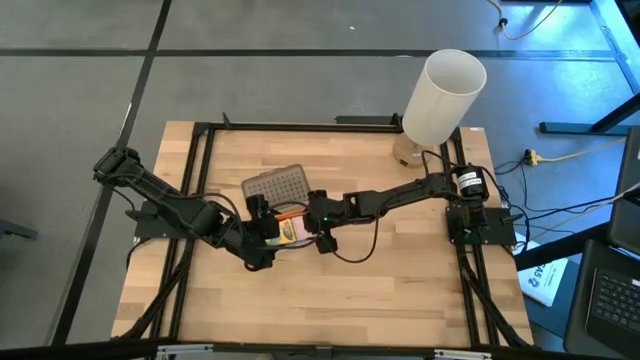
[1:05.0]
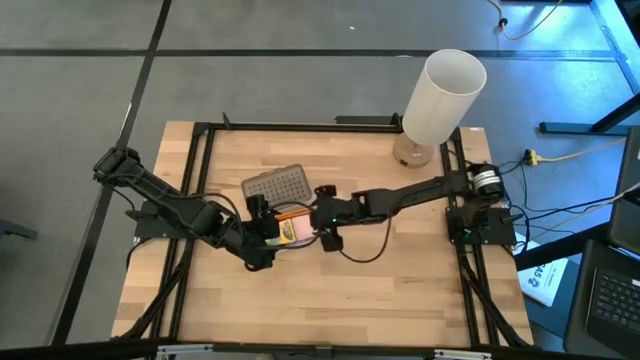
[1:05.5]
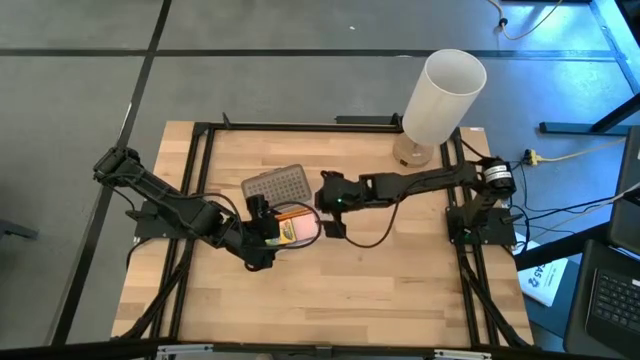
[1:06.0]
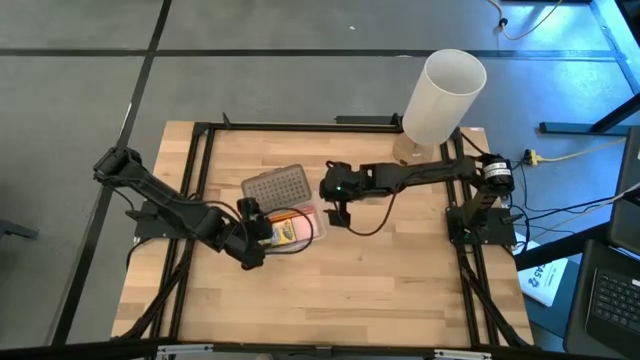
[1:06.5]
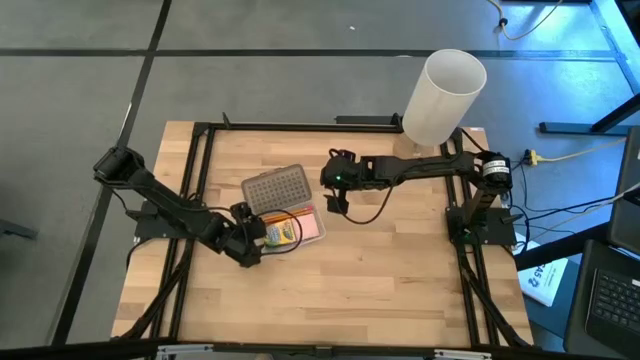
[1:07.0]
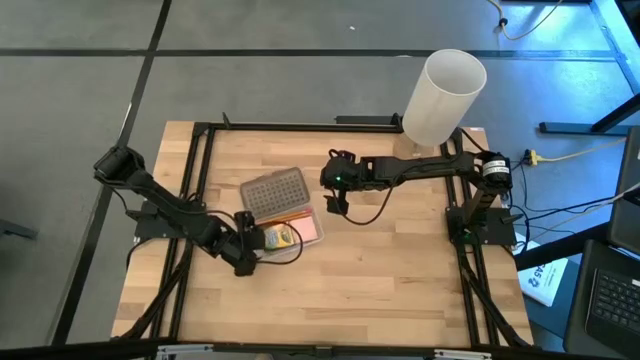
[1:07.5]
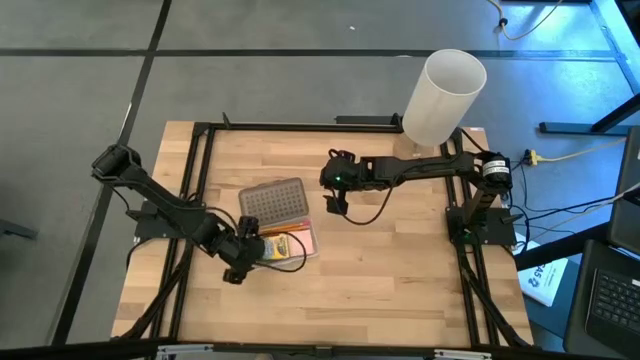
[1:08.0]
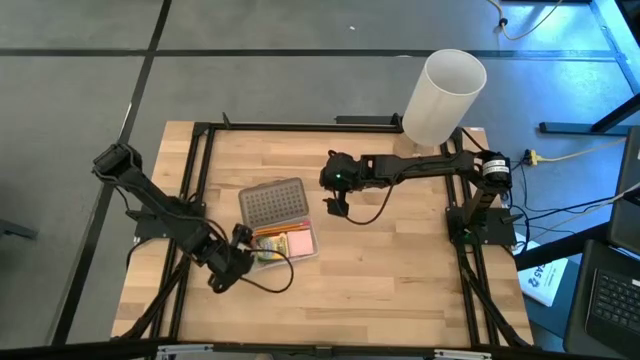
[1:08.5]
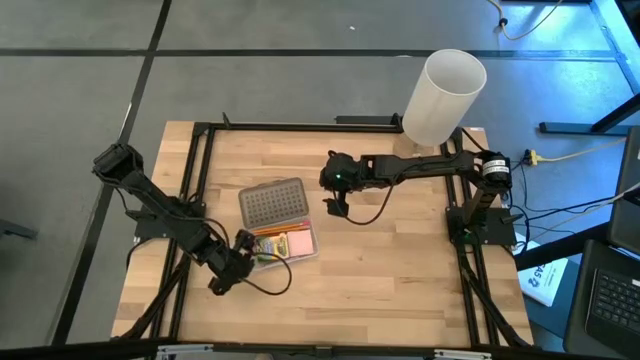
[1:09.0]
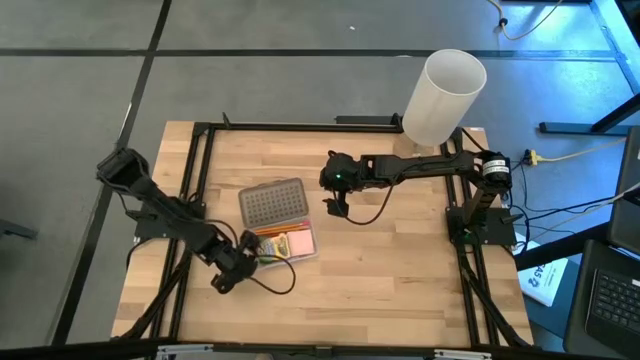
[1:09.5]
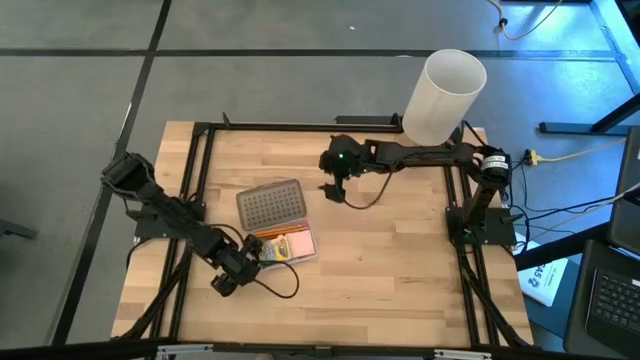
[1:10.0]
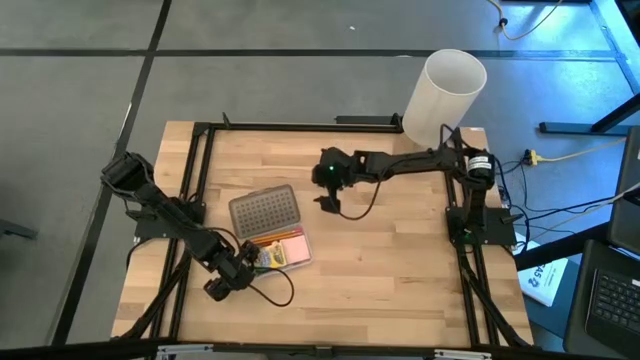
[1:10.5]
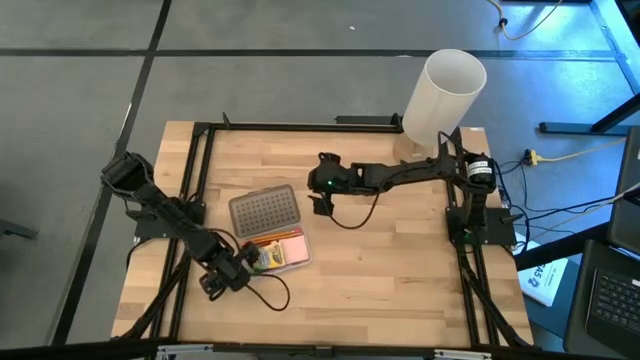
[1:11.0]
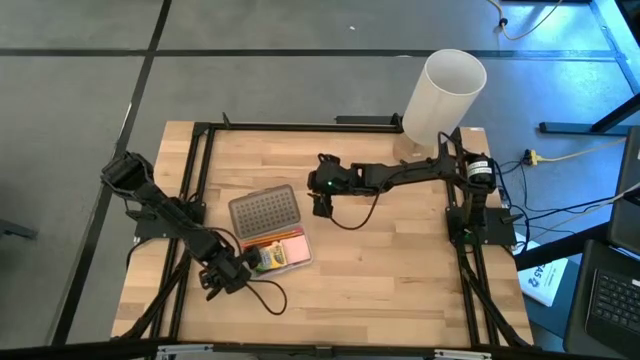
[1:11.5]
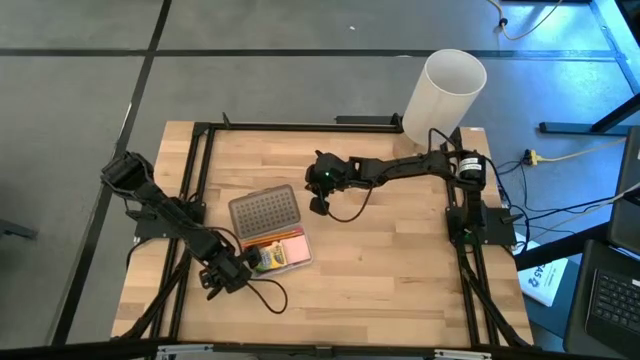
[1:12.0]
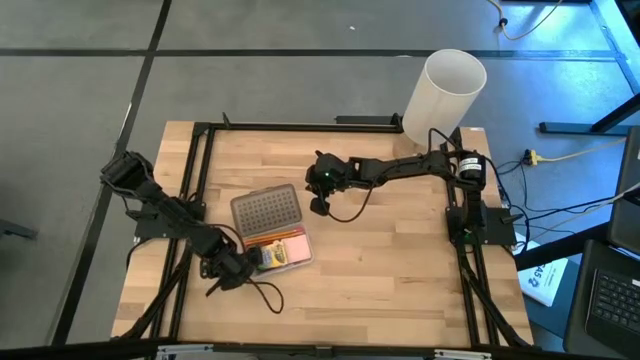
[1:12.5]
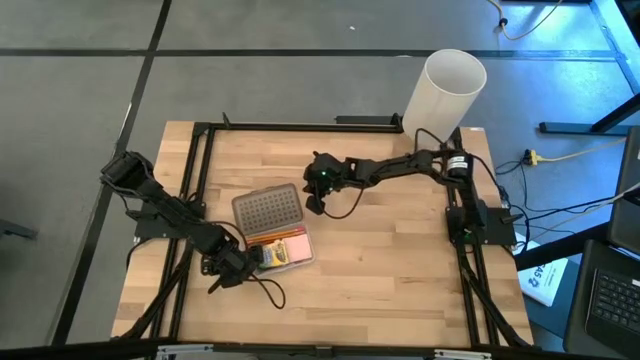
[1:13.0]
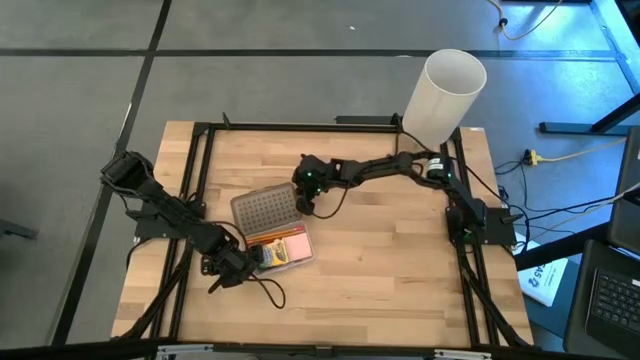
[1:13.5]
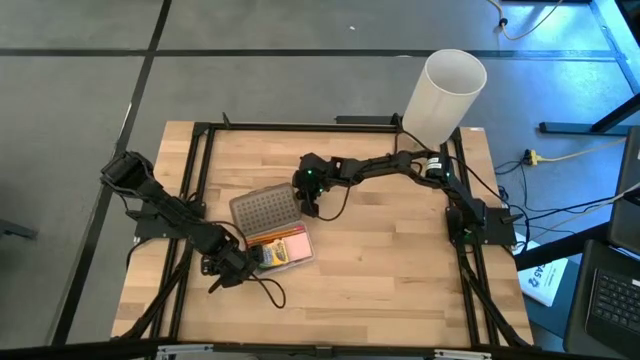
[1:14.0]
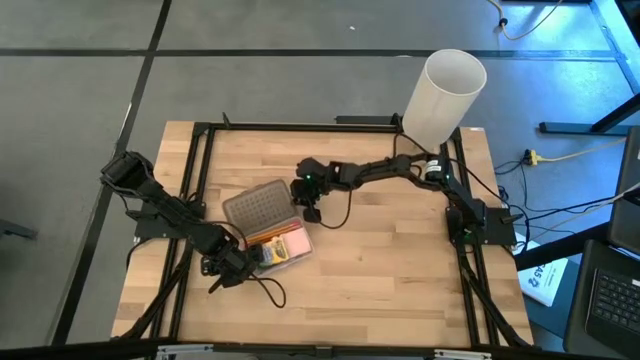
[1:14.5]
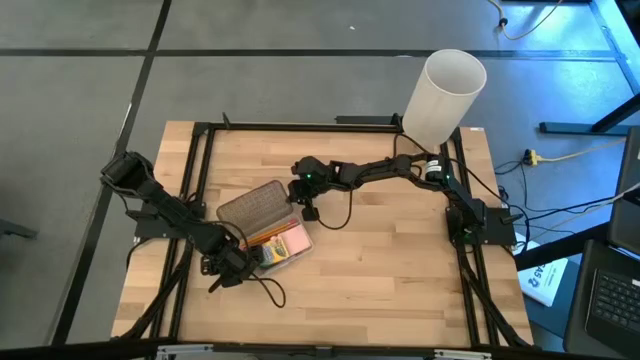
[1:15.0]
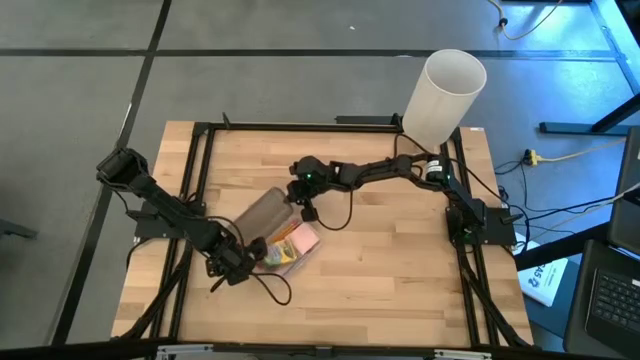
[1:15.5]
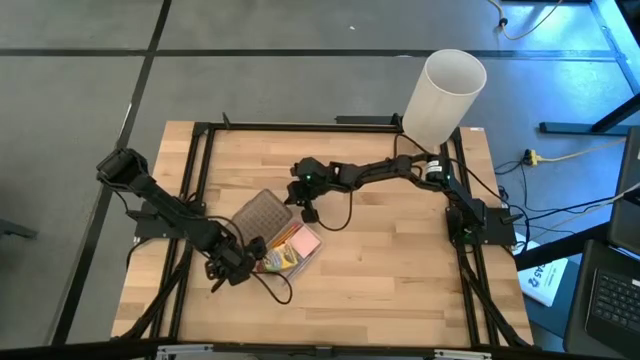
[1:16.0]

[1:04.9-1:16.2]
Task: Pack school essentials
Close the transparent supply box

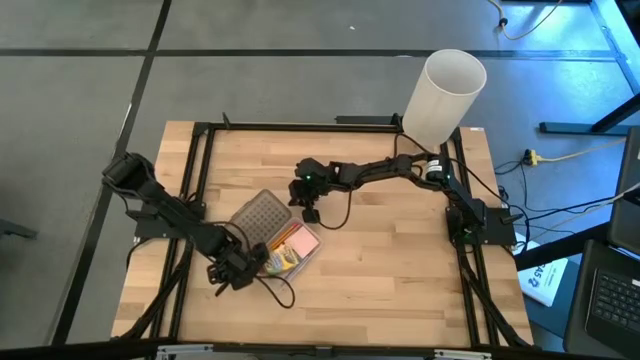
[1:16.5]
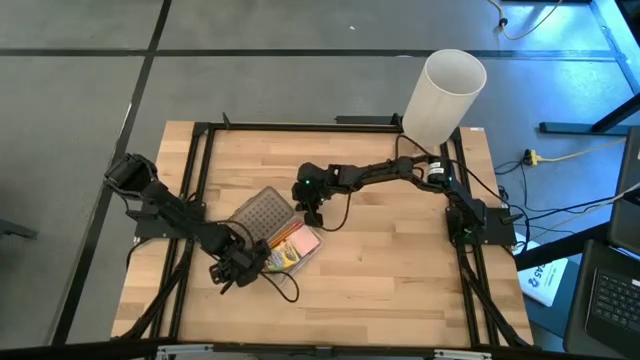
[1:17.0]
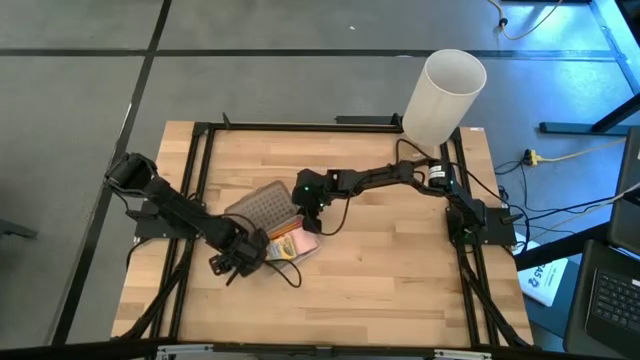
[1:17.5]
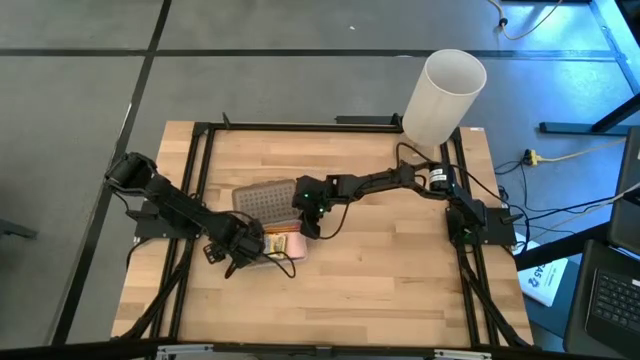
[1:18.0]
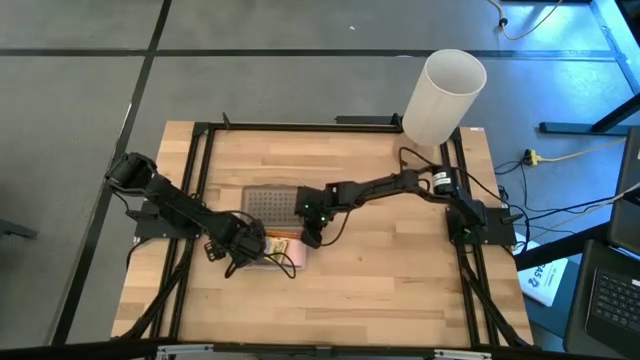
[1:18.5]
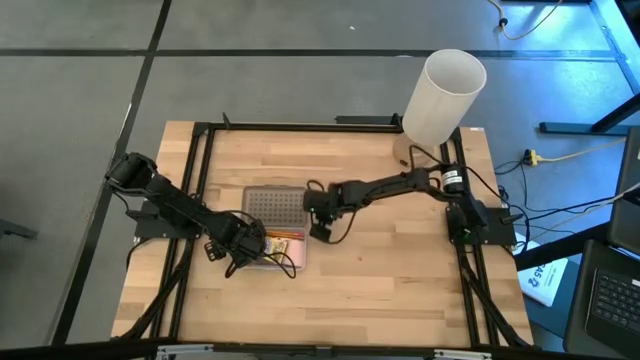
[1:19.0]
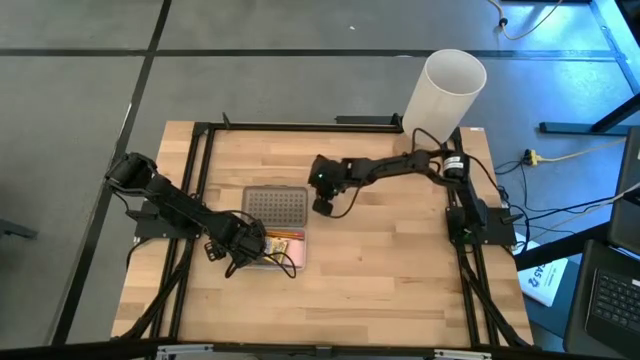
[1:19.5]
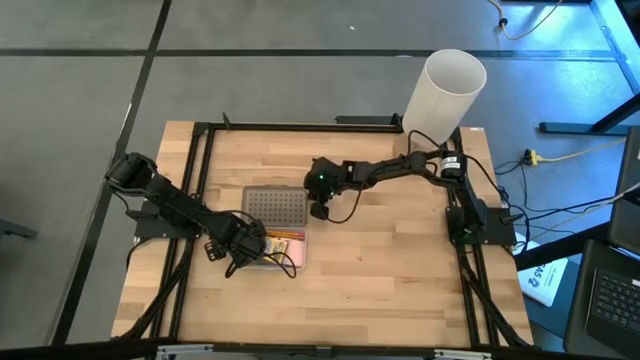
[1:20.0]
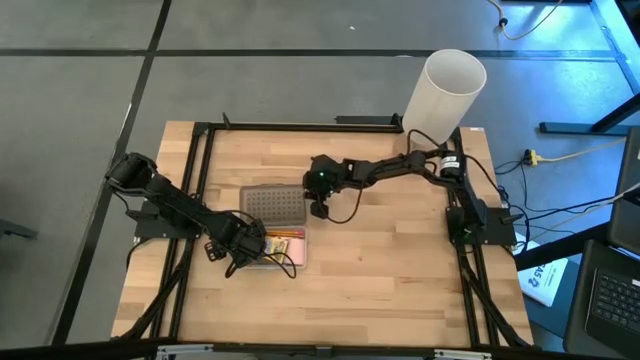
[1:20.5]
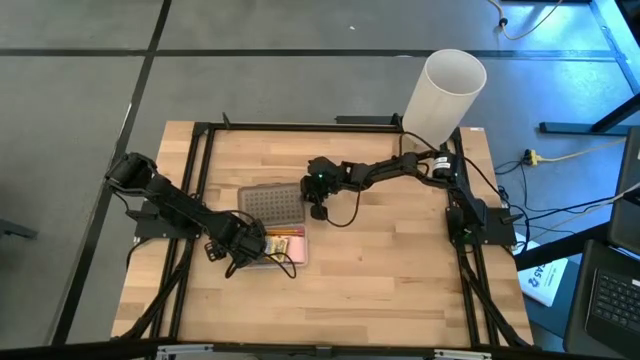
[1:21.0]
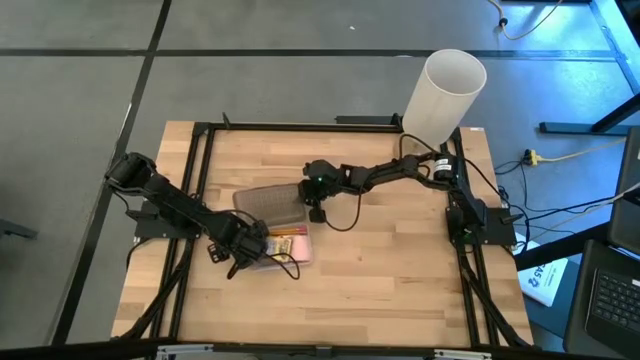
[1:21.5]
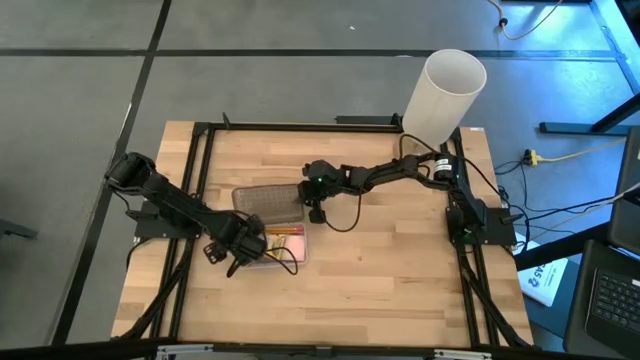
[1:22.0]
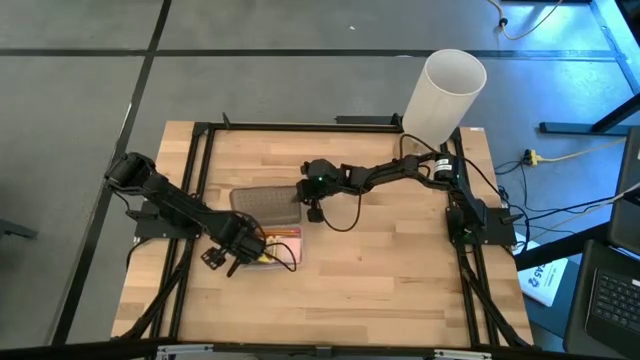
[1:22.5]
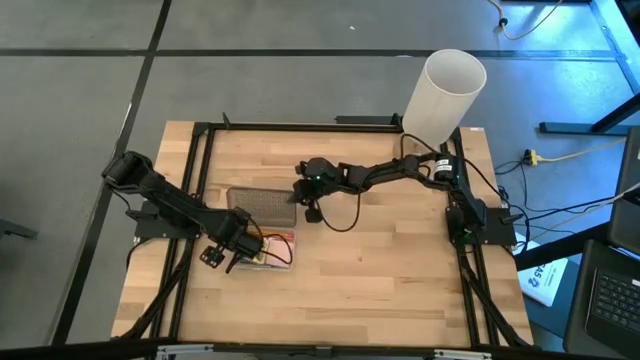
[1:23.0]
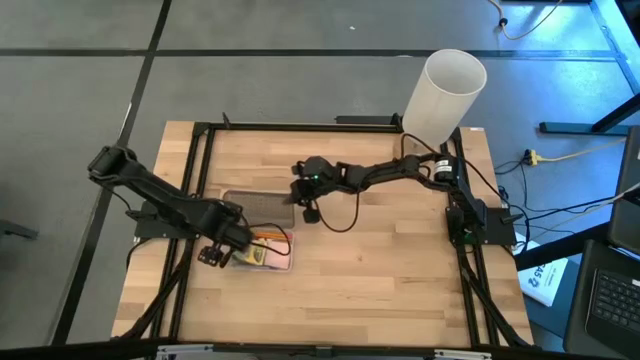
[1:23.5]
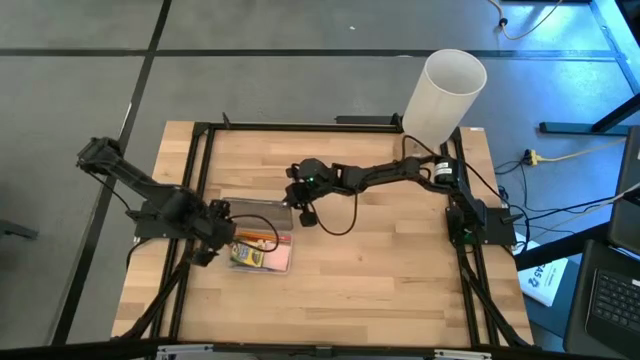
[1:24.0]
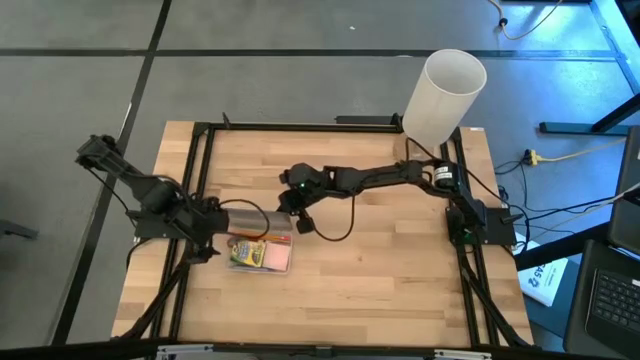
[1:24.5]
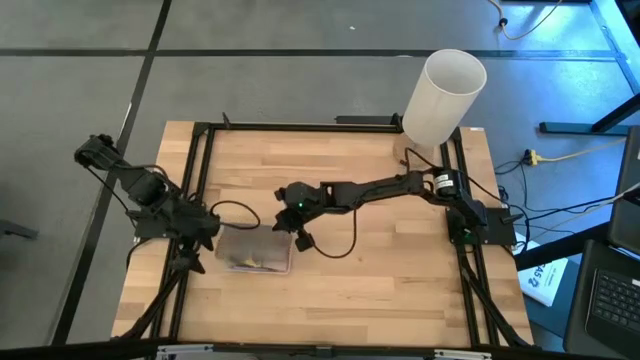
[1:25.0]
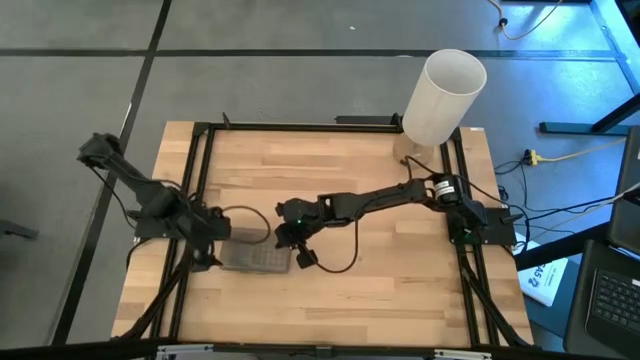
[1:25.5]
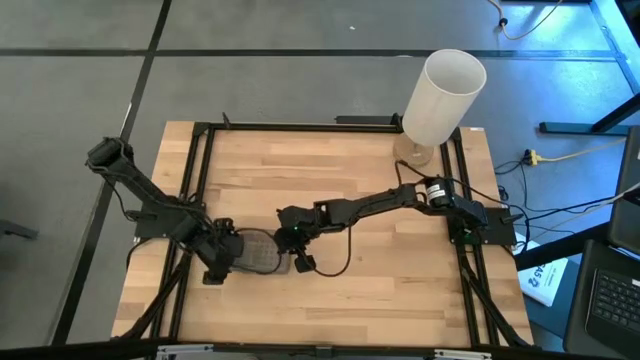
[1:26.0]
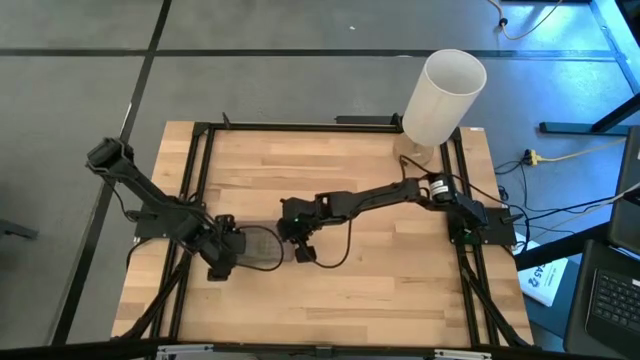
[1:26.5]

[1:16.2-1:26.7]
Close the transparent supply box
